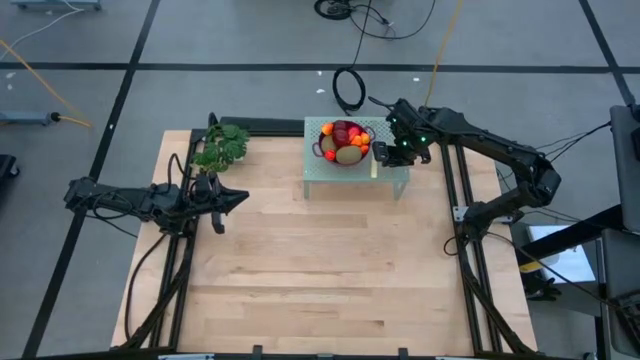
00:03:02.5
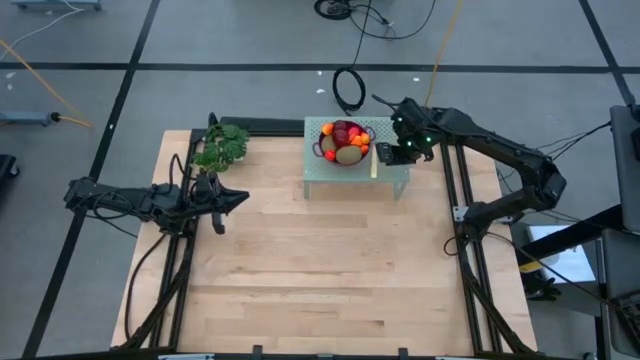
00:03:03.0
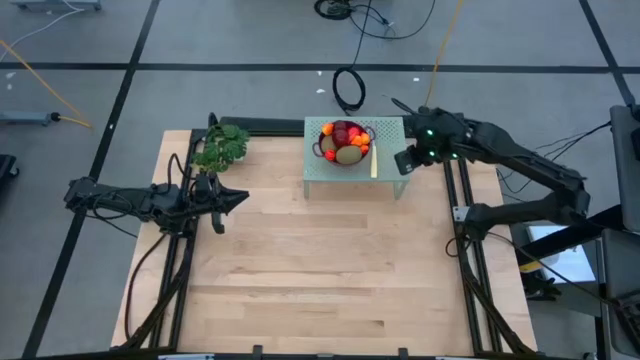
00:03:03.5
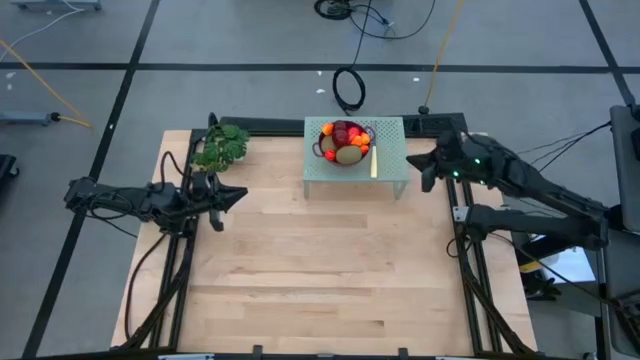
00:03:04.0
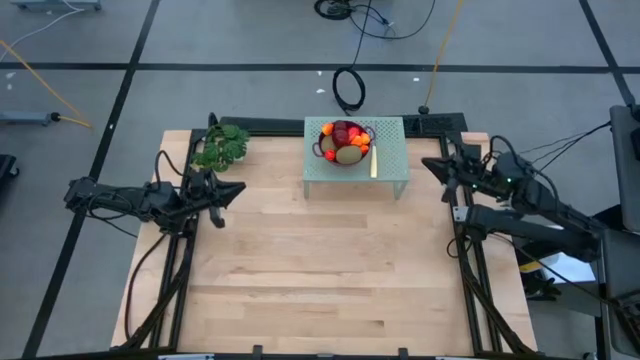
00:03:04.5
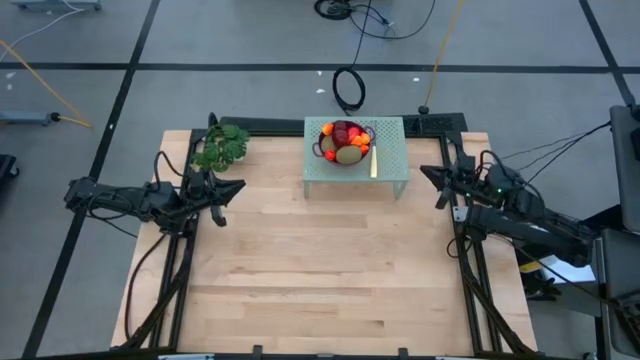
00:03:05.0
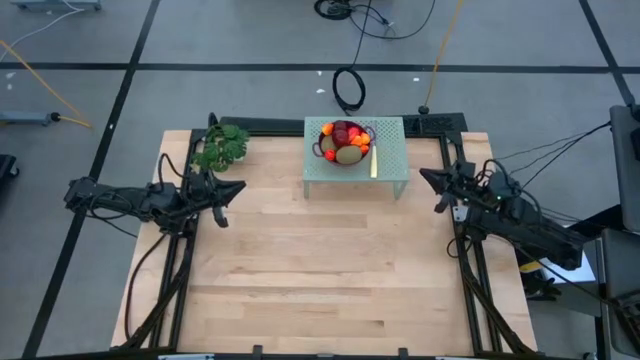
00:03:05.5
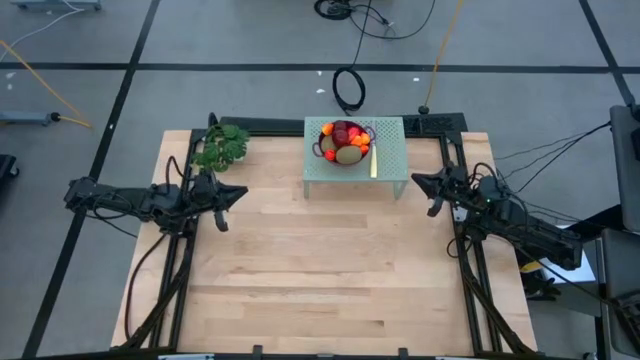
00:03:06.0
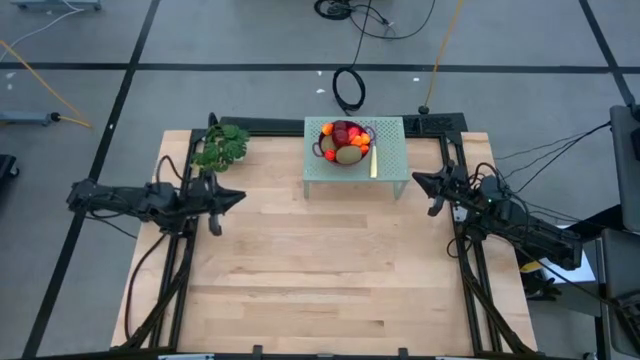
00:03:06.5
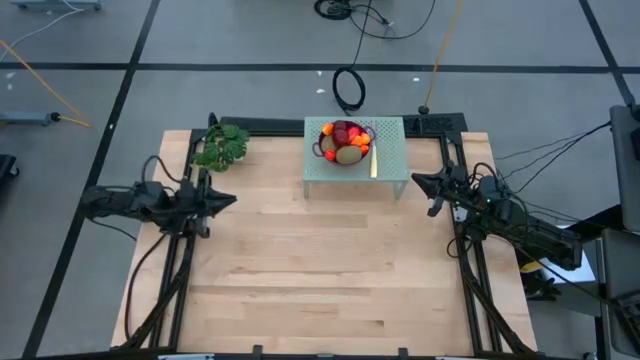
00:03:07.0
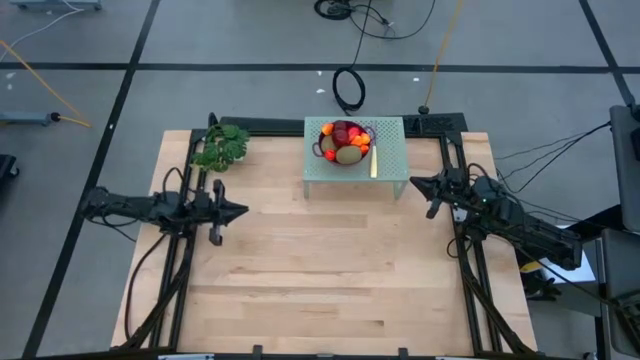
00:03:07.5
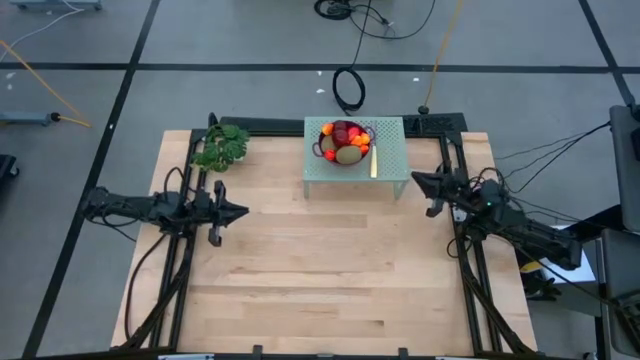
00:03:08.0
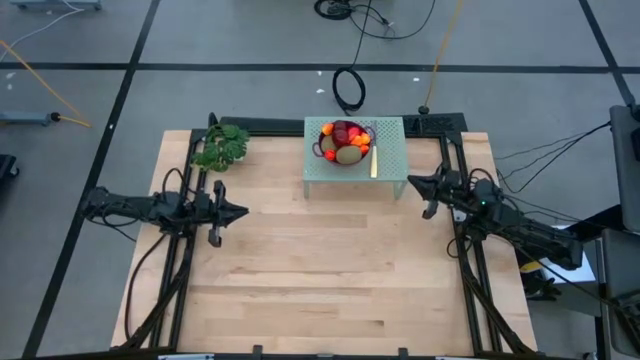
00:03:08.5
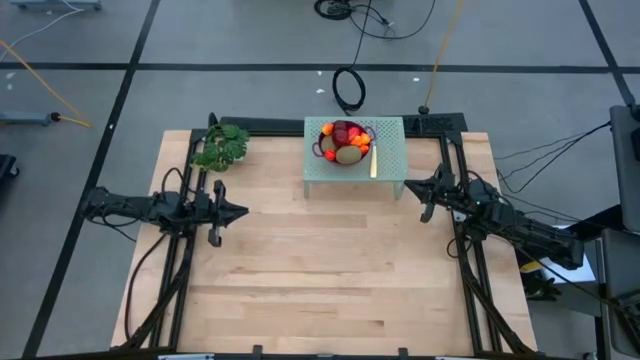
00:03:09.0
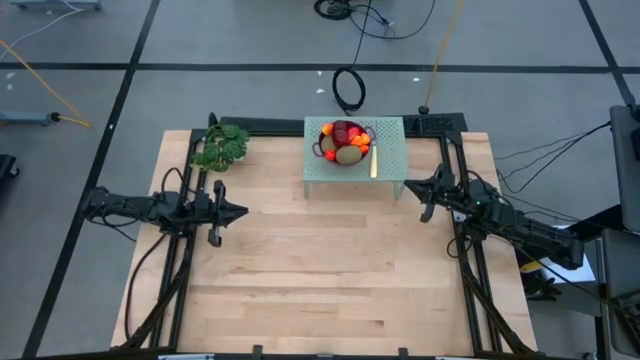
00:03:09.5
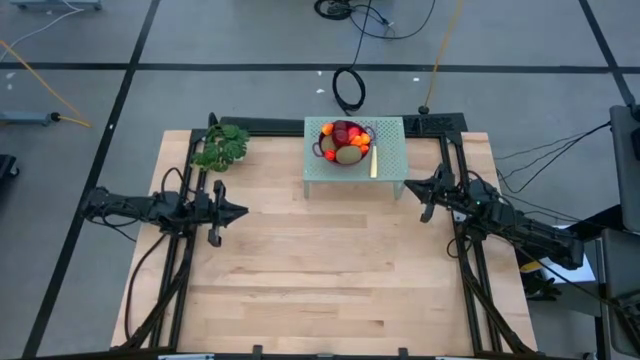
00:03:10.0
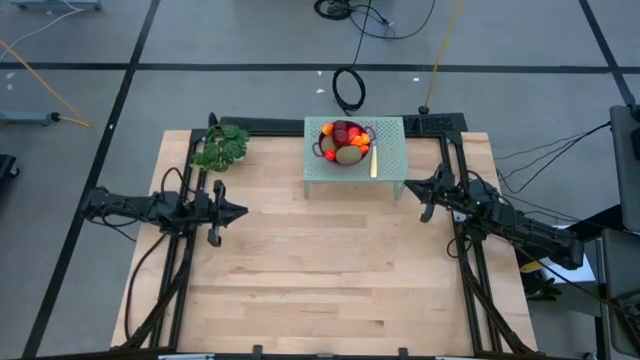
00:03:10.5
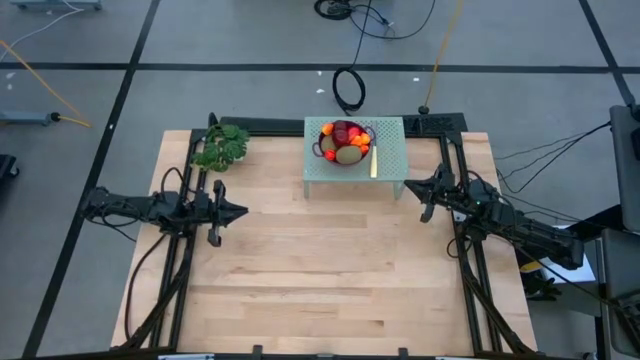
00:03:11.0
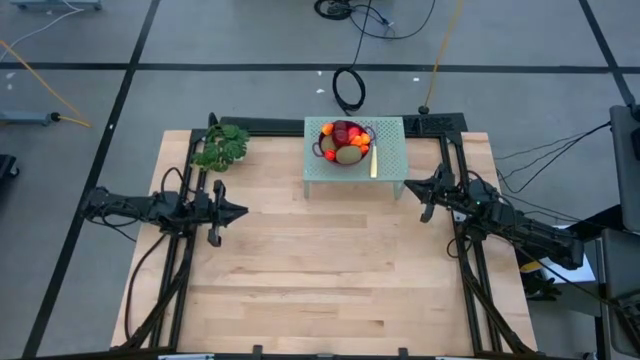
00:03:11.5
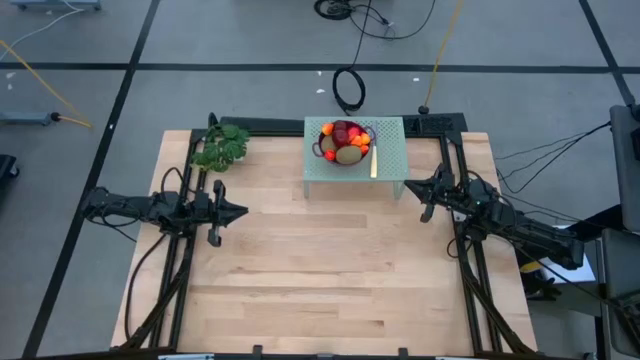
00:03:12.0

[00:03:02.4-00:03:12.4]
Task: Pick & Place Fruit
Return To Home Position

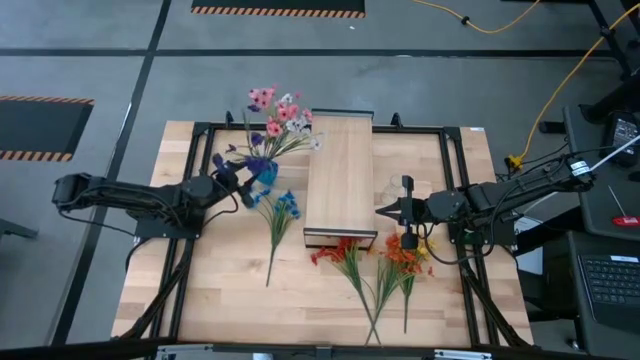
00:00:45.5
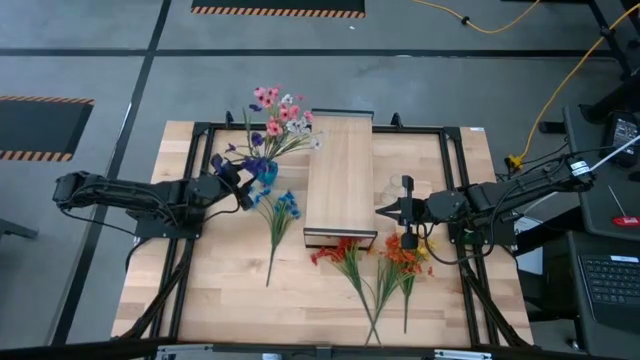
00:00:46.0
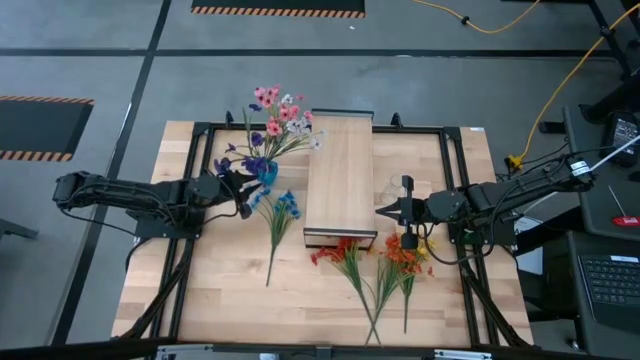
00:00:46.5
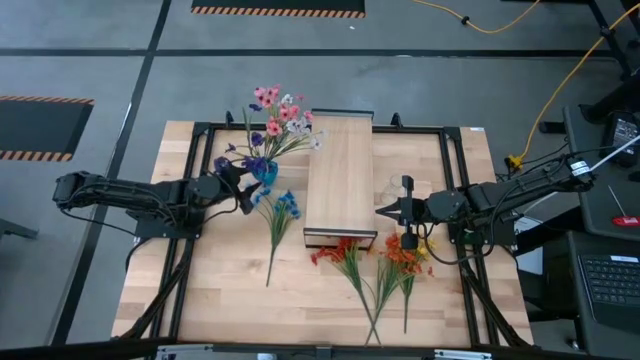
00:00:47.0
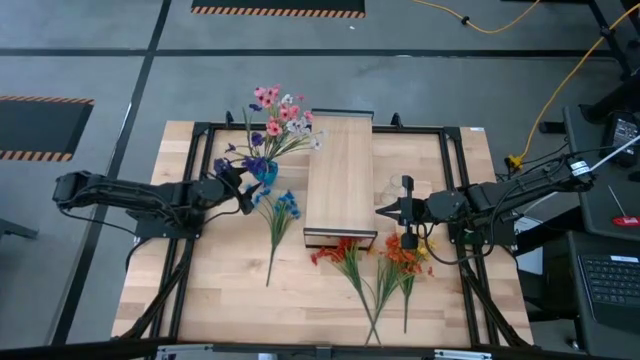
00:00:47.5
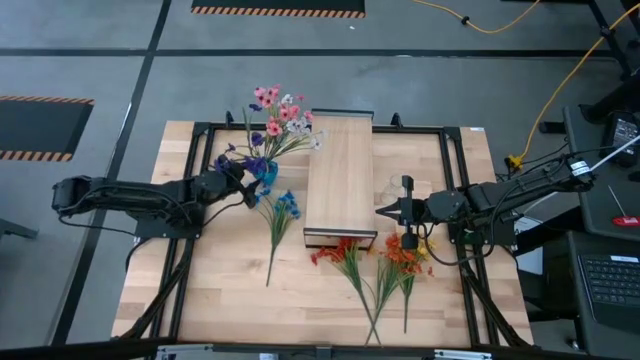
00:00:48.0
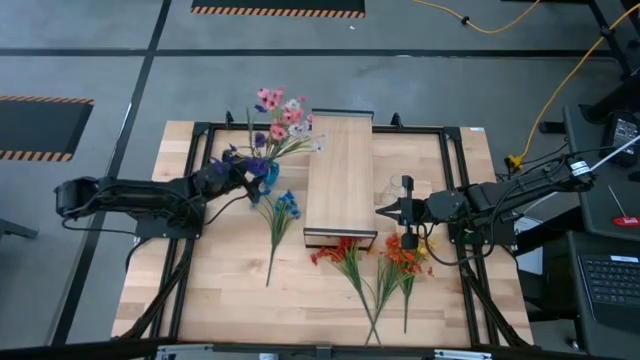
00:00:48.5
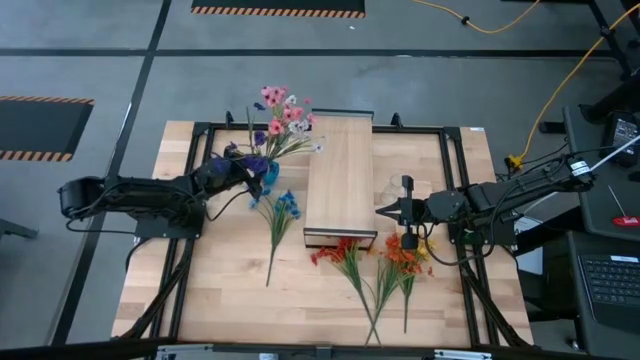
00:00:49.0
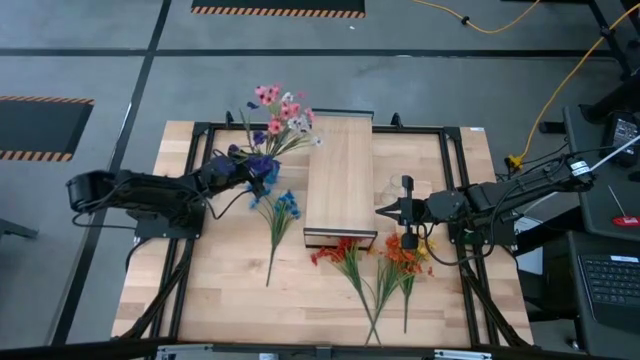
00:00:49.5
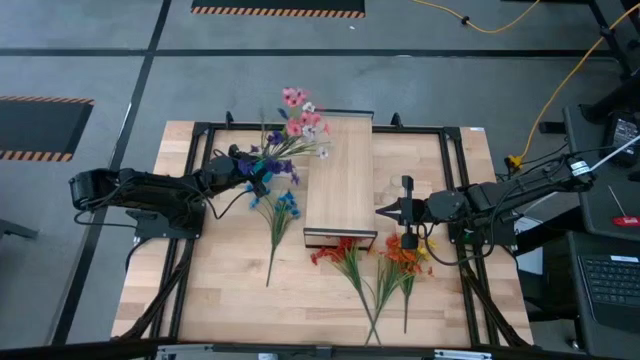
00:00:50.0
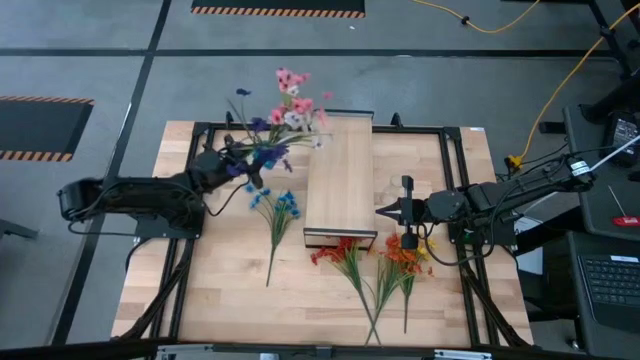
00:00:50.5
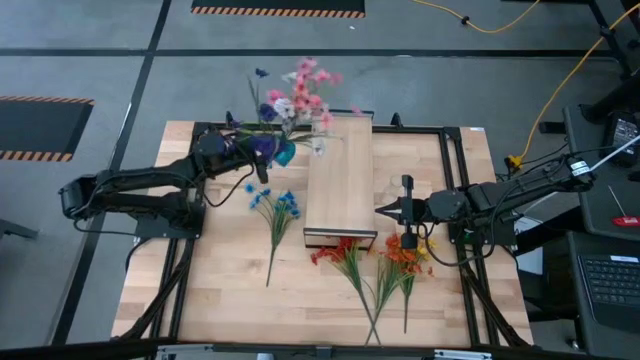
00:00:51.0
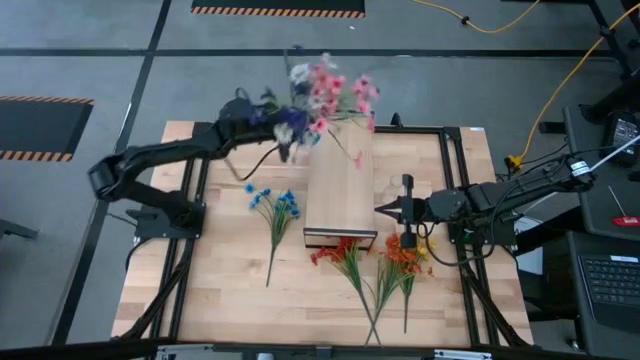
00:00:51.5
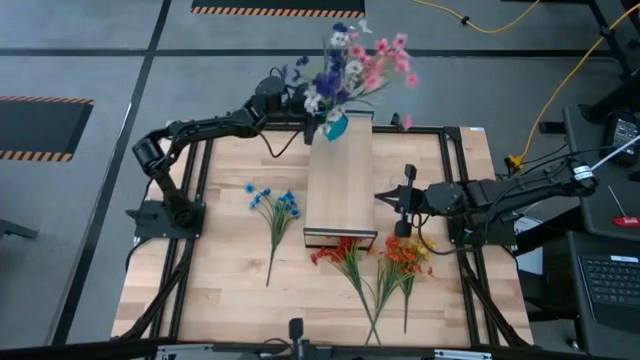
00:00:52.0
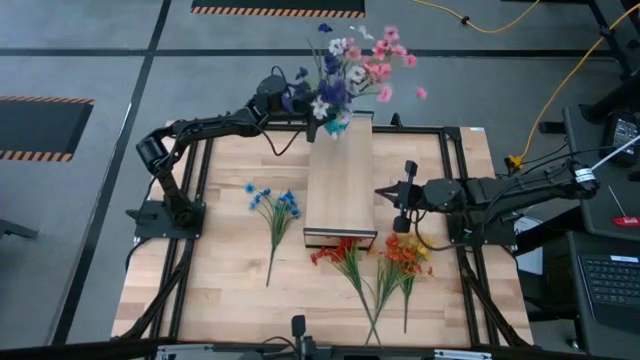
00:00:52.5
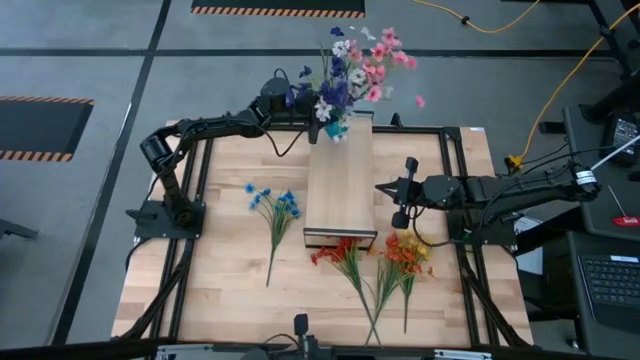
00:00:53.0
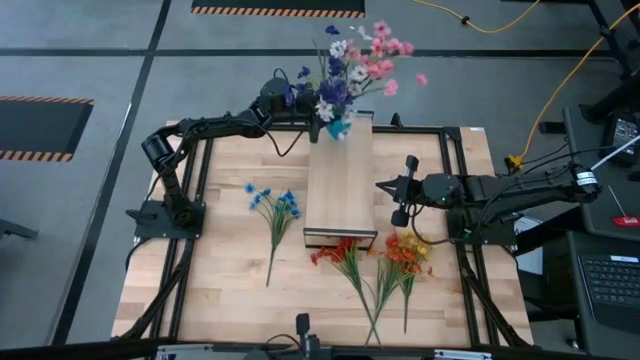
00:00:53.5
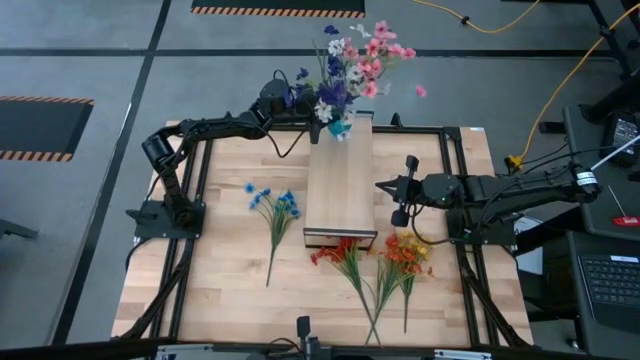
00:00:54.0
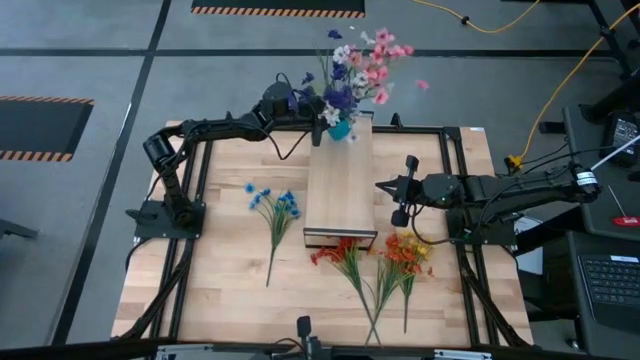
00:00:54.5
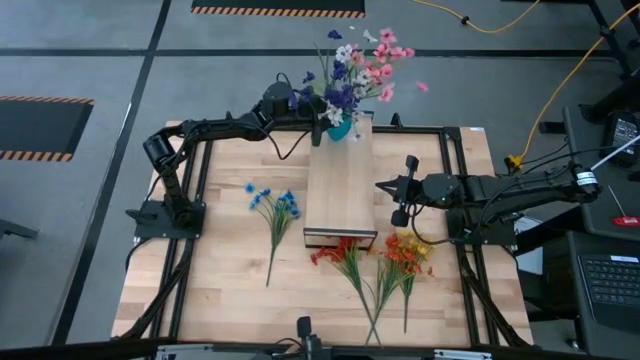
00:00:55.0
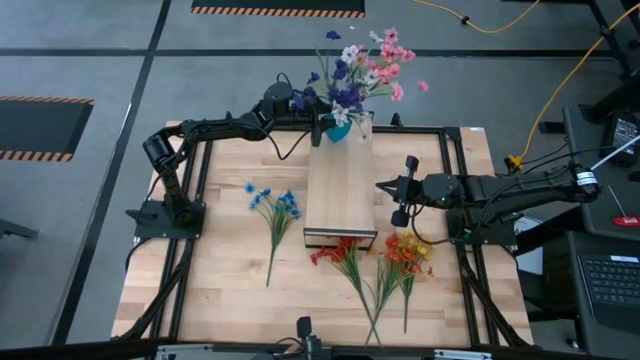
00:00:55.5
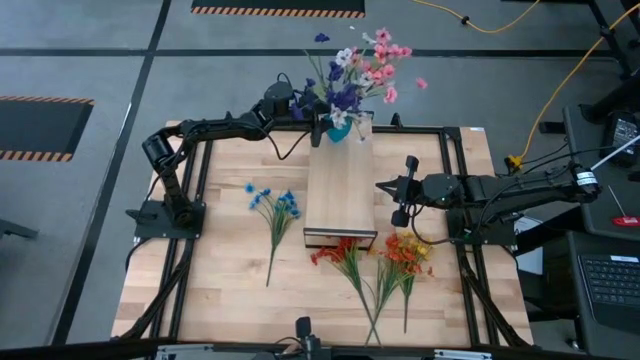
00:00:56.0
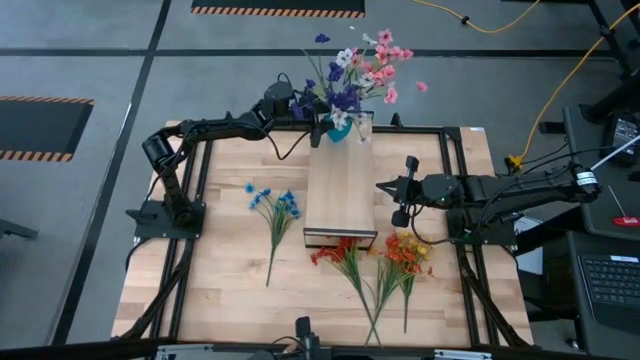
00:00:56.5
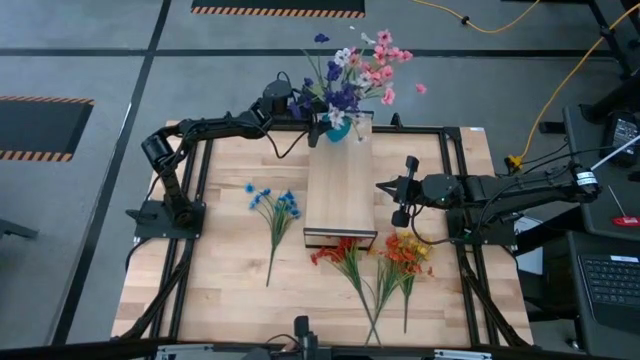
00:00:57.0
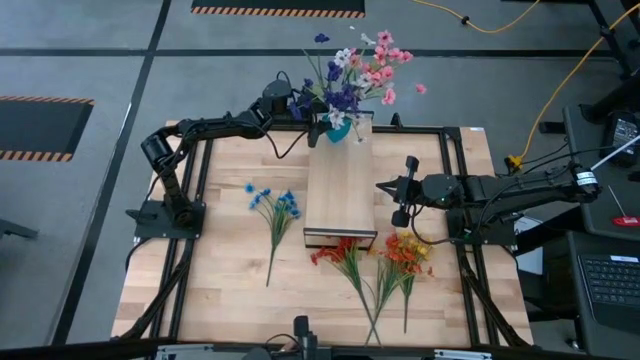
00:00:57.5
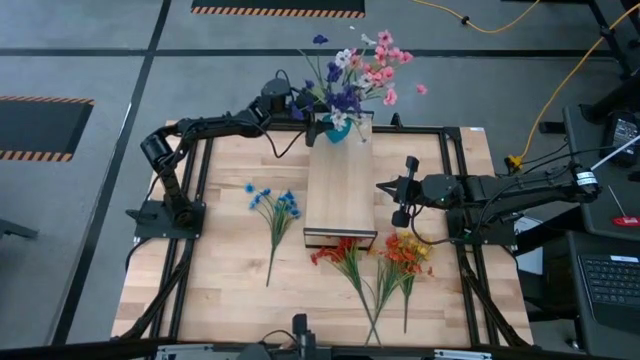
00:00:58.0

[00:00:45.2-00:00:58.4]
Task: Pick and place flowers into a vace then onto a shelf
Put the blue vase on the shelf
